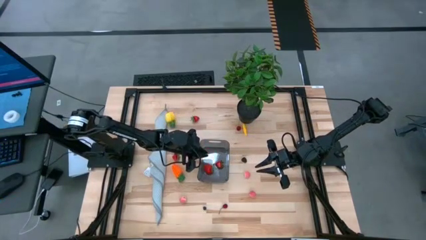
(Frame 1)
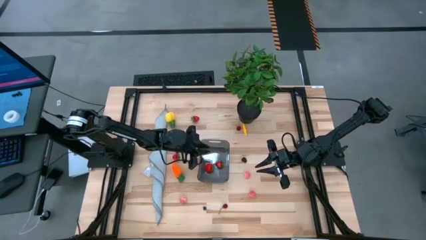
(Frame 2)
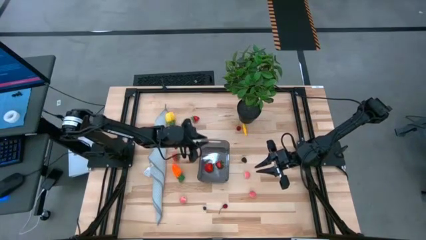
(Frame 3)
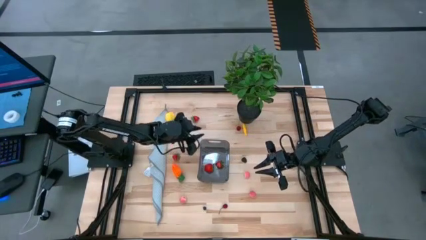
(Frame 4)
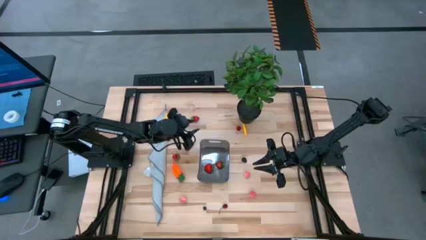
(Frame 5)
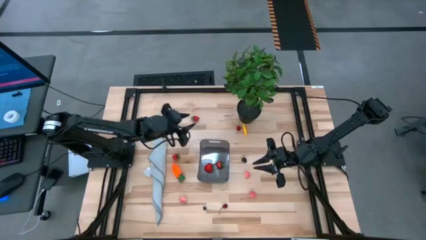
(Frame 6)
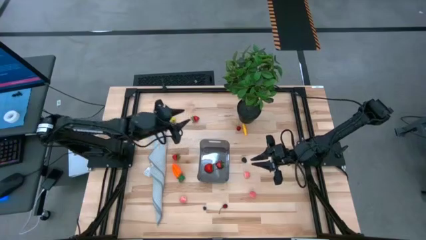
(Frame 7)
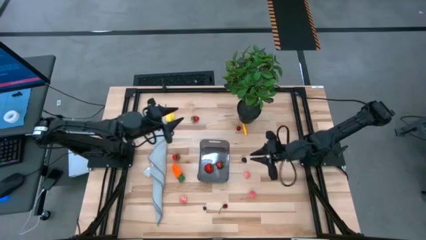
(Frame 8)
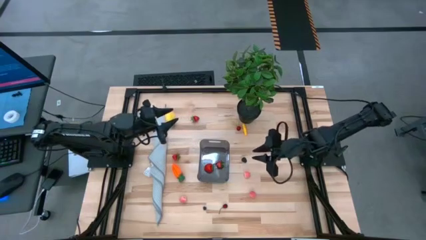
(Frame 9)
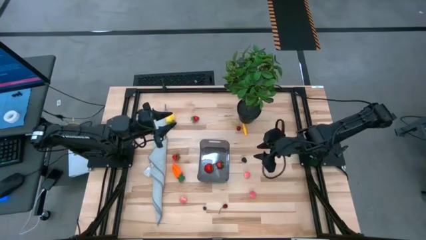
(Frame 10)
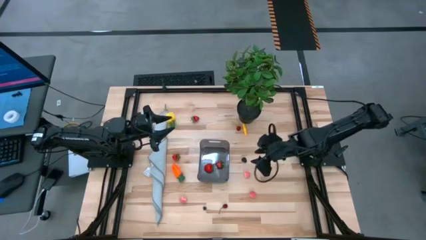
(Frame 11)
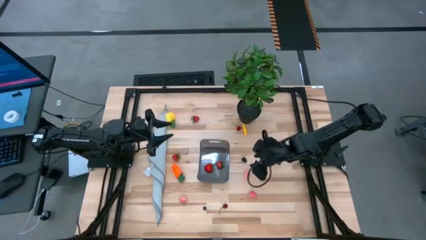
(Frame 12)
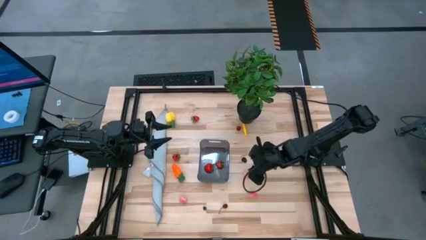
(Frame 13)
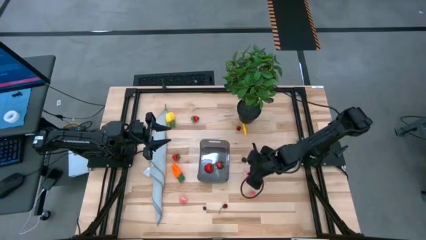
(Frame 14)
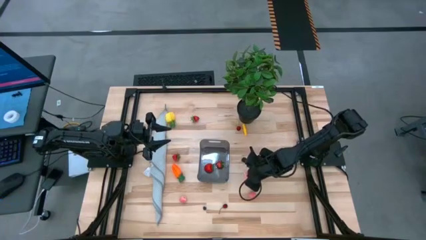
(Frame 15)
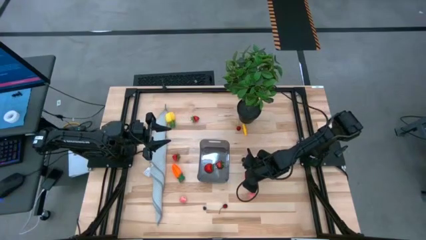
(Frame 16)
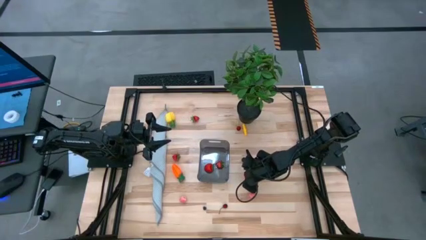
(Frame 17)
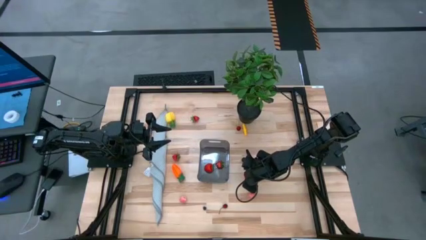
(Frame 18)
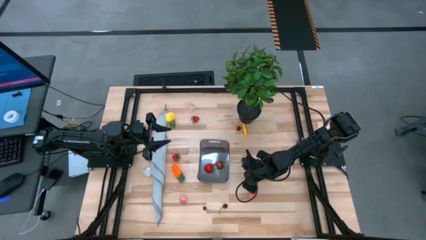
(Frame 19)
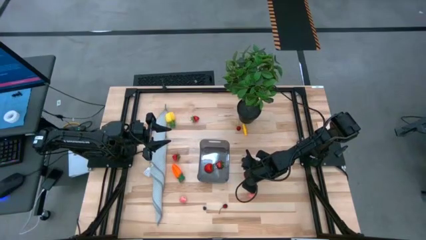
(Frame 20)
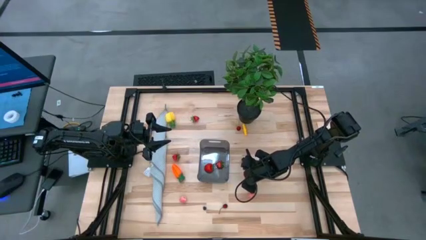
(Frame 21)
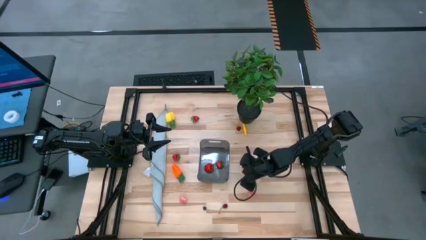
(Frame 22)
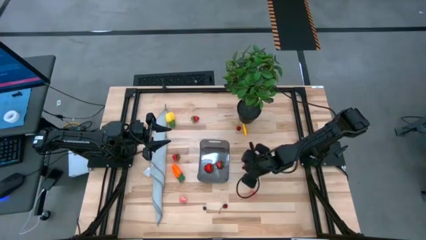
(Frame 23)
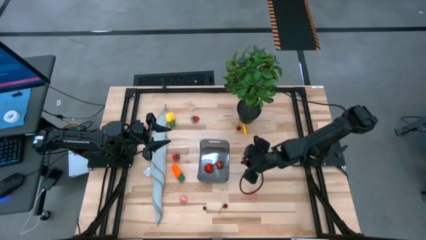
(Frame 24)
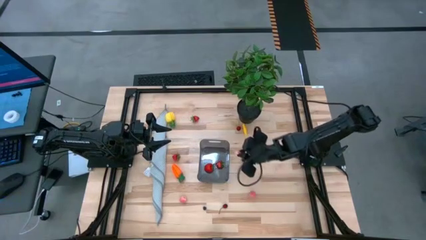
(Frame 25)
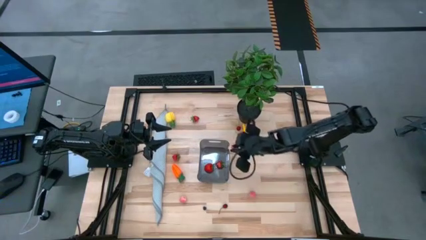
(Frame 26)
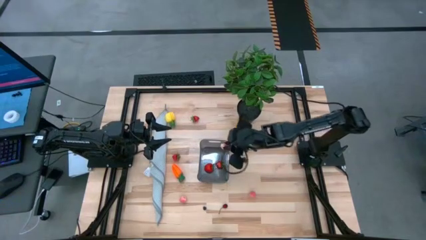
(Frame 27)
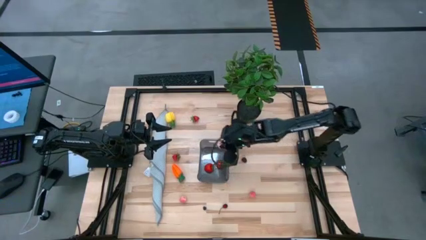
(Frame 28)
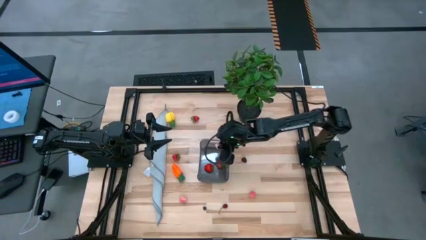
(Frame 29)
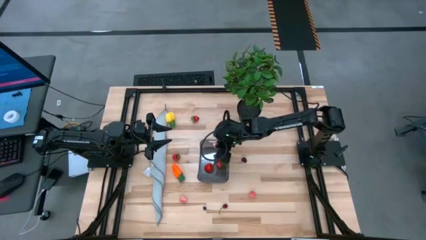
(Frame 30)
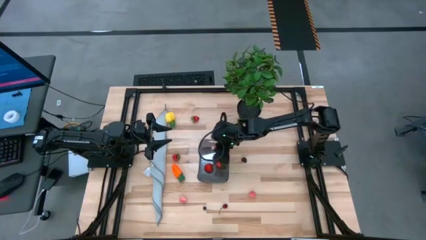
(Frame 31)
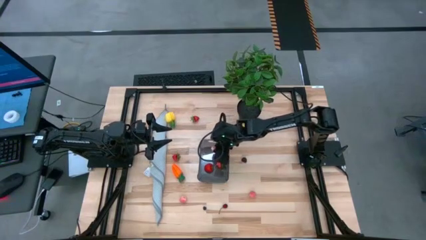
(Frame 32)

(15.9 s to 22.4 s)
Task: Pick and placing Produce into tupperware
Put the top right peach into the bin

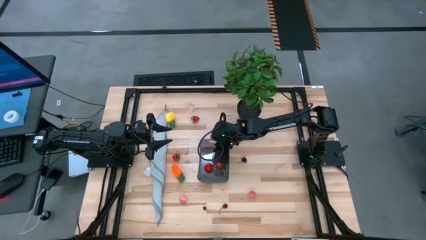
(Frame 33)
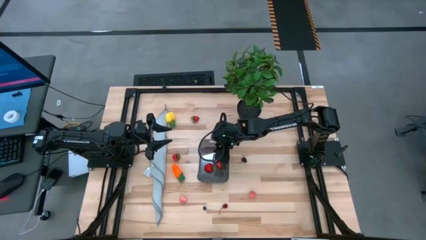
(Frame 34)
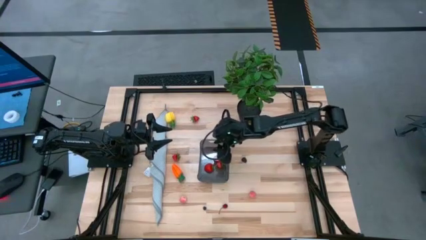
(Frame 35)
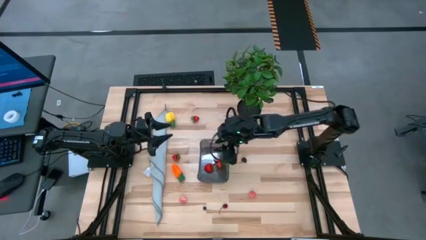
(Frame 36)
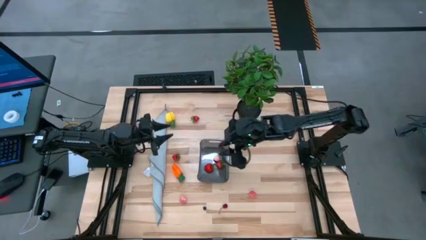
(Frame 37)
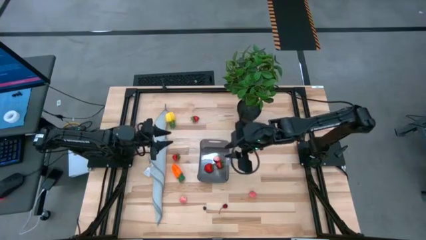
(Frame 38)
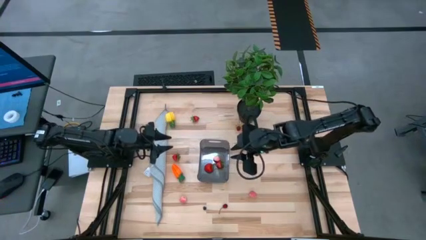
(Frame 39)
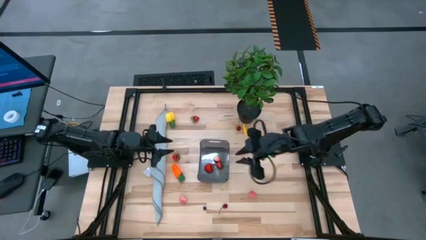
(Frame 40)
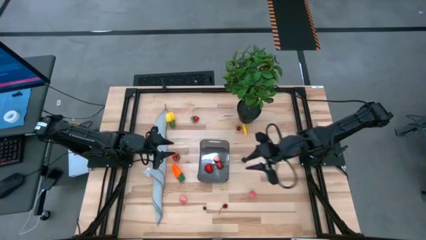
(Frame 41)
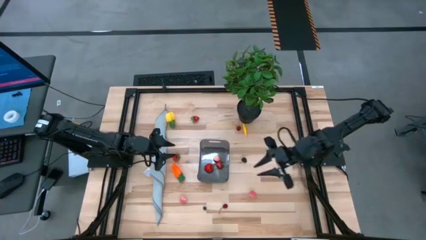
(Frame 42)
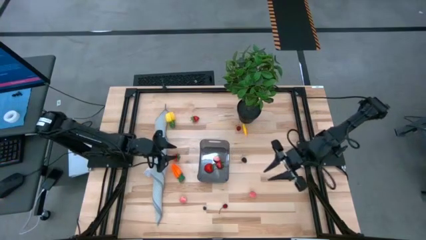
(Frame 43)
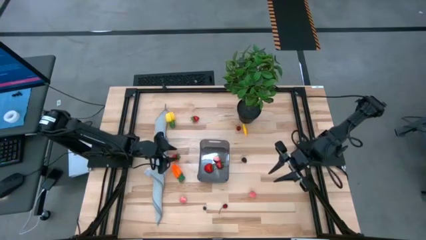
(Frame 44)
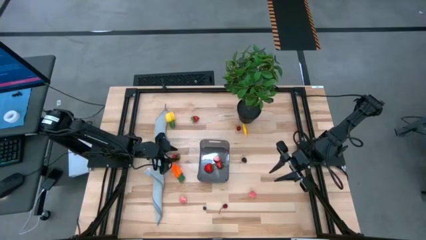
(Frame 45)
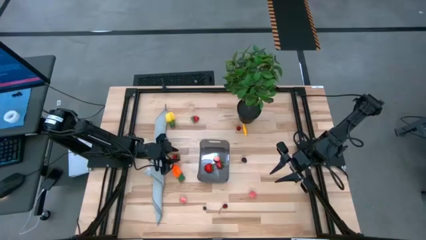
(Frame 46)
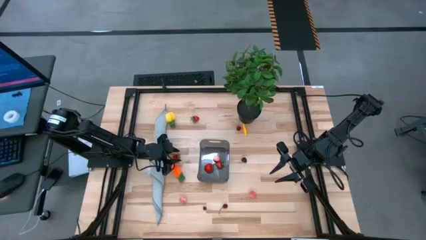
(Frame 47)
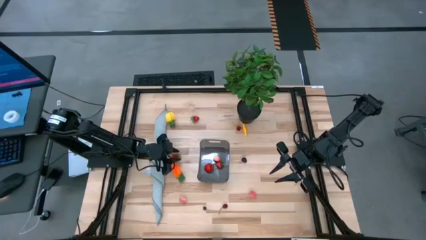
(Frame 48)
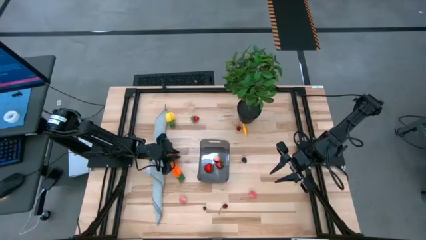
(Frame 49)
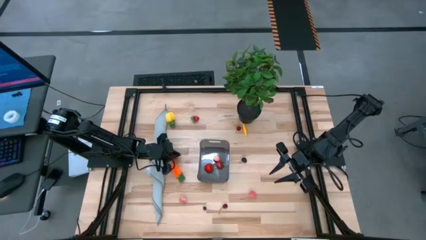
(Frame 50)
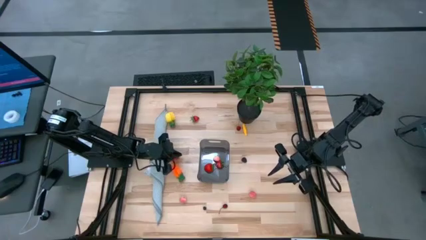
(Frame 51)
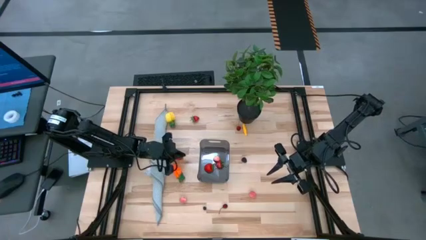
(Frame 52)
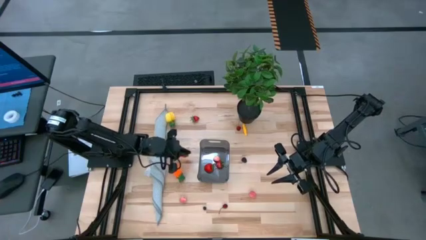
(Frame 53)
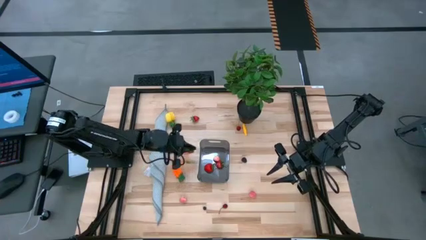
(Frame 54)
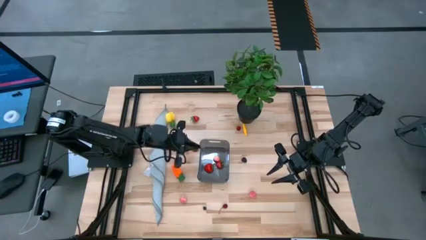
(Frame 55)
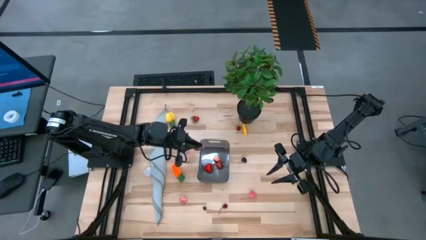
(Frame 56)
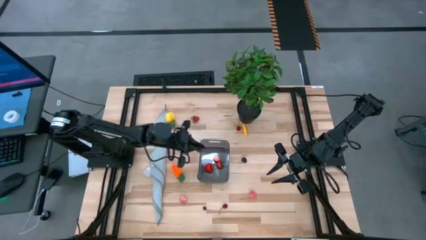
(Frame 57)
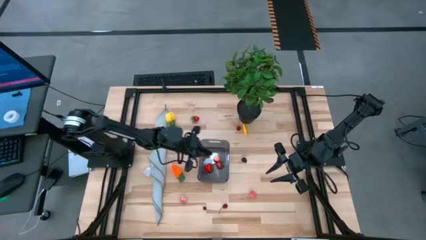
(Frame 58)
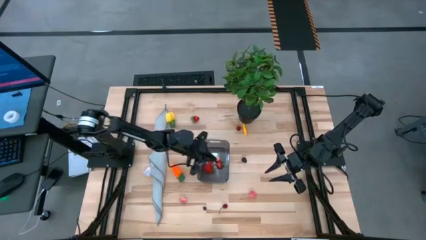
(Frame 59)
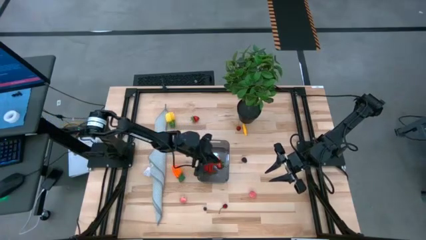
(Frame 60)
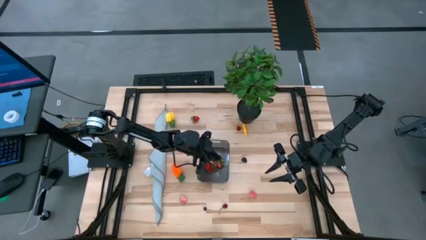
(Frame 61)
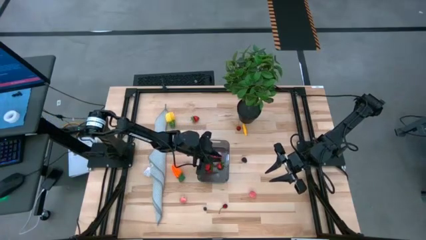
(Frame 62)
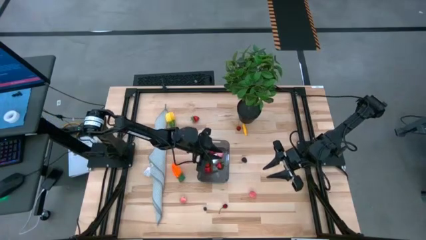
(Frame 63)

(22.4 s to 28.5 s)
Put the bottom strawberry into the bin

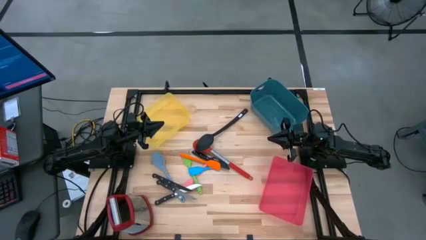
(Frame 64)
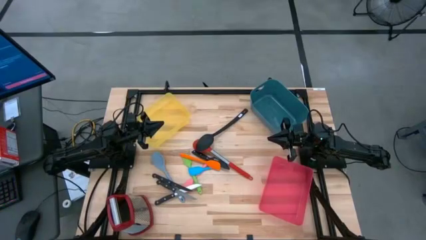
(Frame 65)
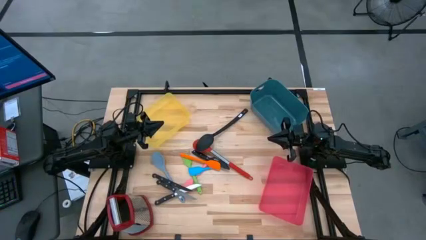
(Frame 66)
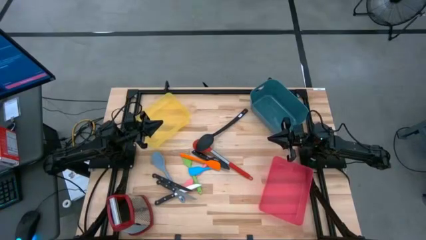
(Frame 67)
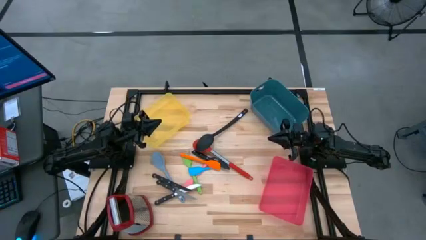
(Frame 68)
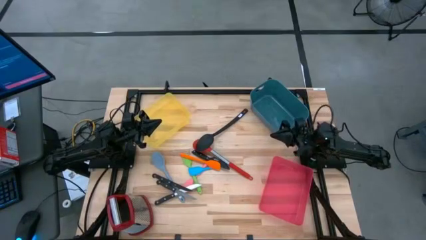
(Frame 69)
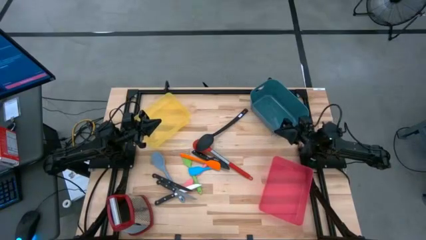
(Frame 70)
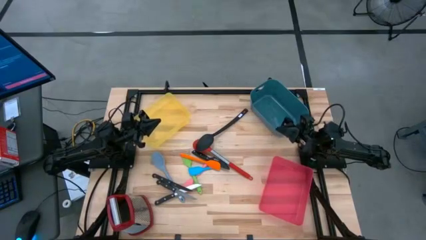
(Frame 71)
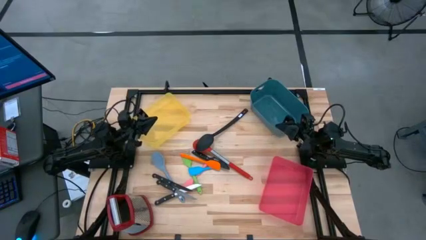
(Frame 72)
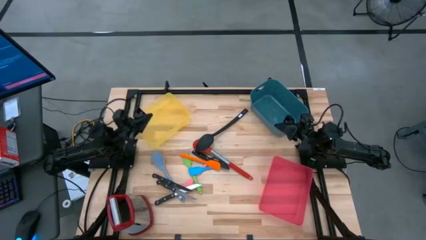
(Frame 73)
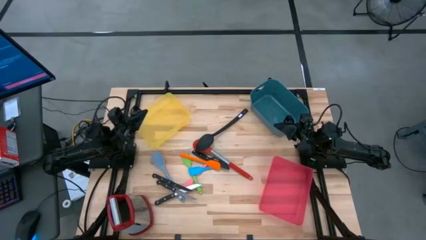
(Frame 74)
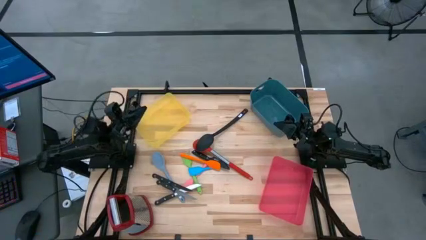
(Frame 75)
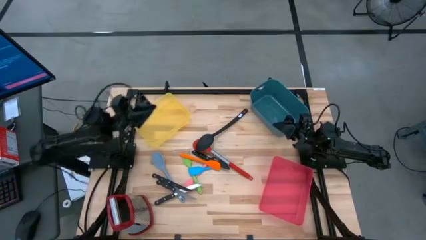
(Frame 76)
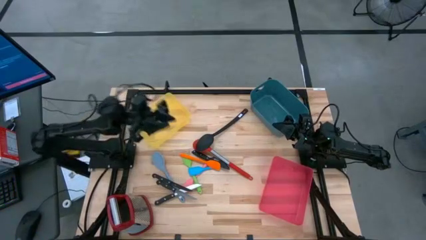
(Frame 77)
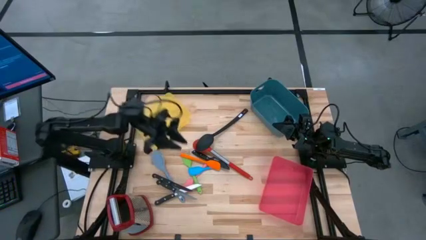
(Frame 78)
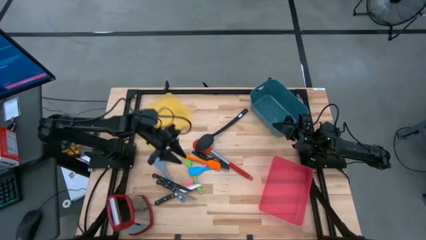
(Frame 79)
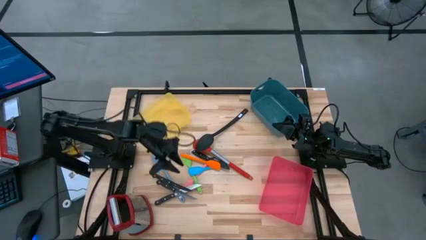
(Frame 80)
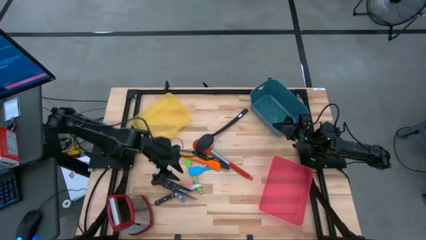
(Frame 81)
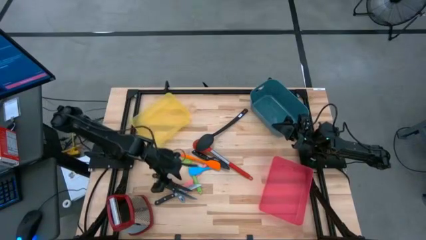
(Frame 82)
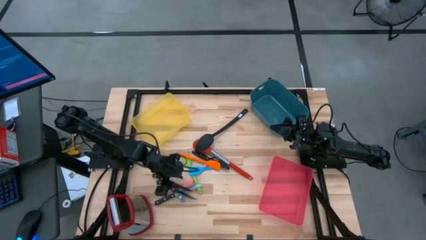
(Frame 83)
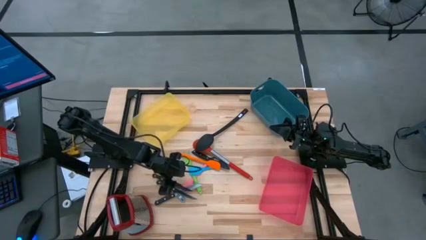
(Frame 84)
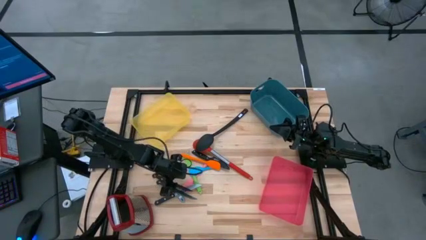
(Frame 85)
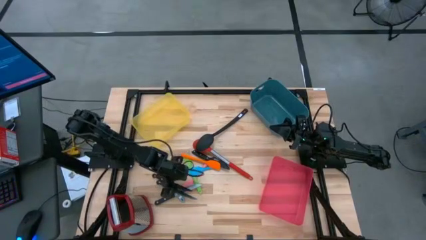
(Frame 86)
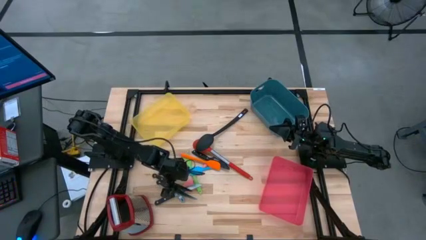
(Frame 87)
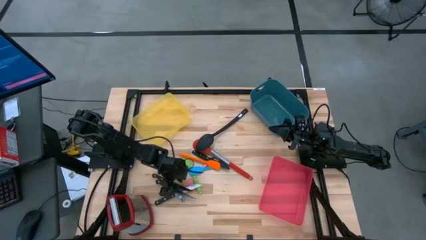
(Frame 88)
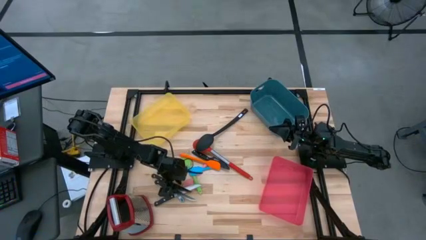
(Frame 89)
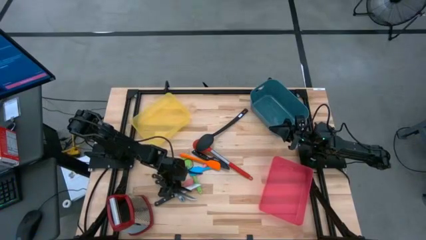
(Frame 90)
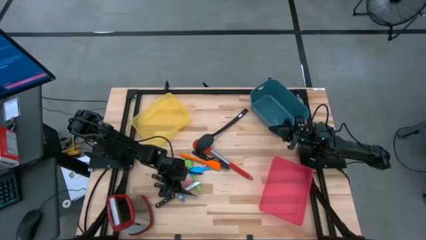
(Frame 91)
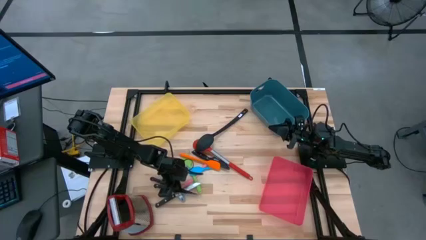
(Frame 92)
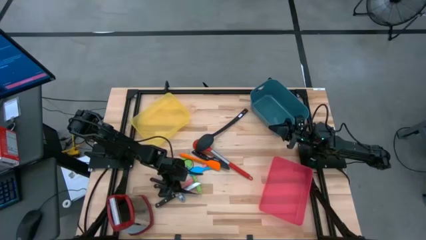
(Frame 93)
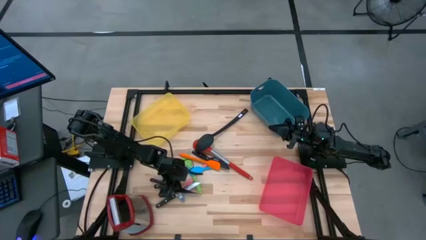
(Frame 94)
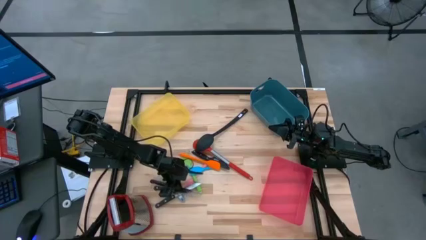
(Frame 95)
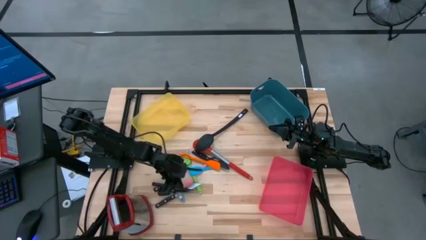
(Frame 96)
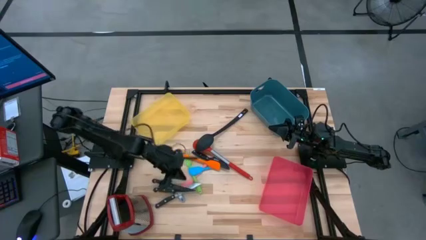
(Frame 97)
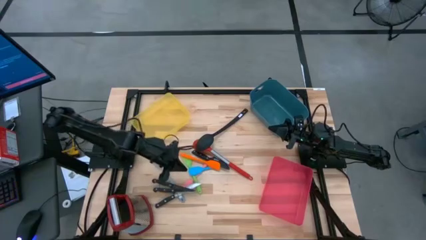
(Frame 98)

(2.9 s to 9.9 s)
Task: Pick & Place Kitchen Items
Put the black knife into the yellow bin
